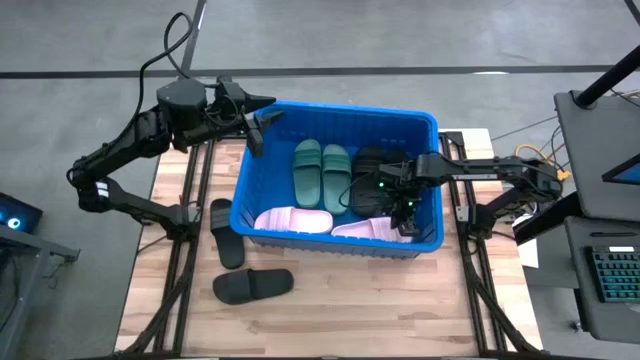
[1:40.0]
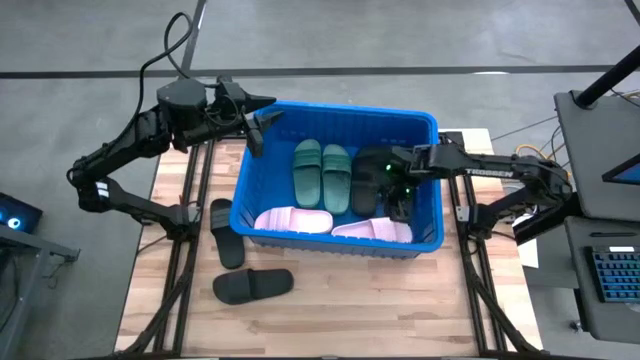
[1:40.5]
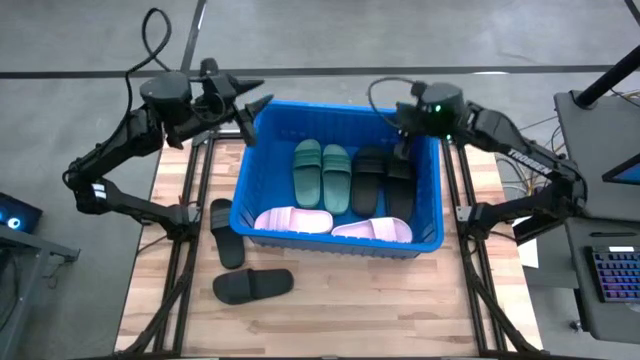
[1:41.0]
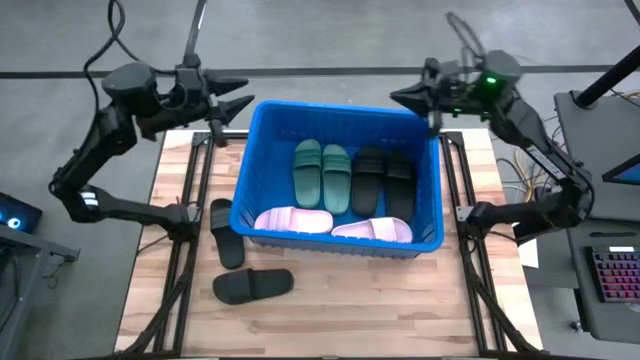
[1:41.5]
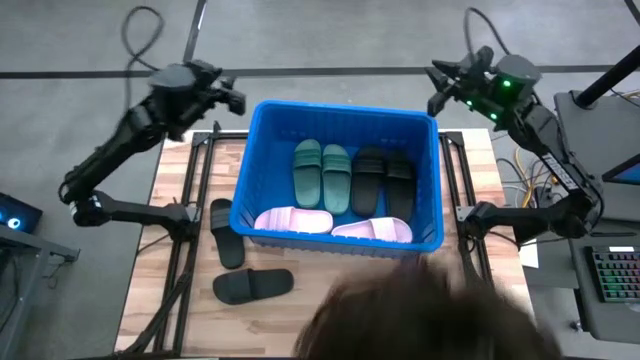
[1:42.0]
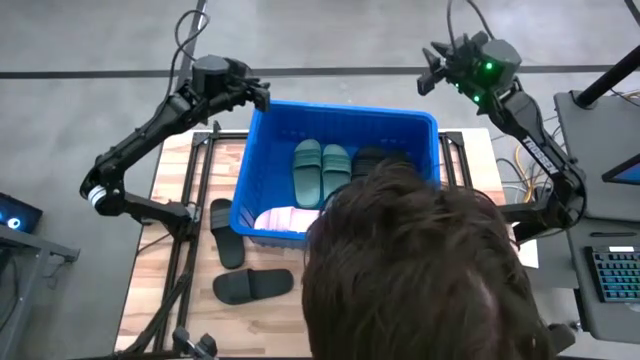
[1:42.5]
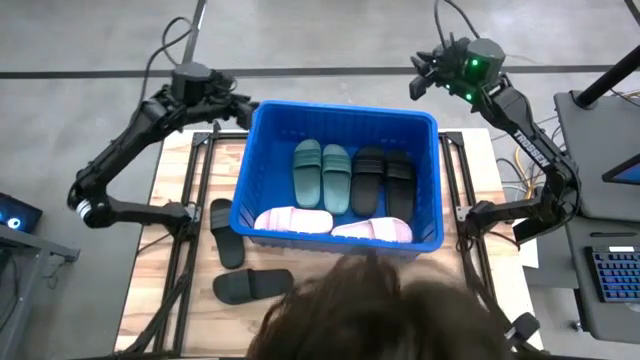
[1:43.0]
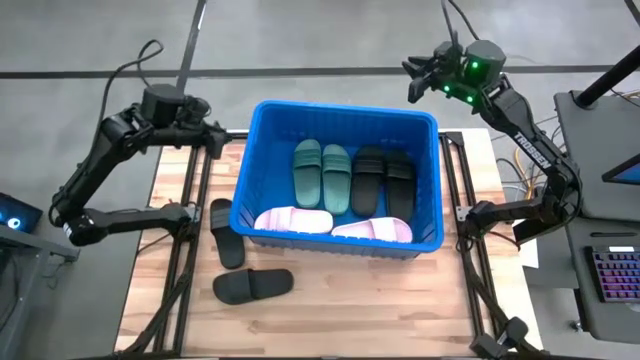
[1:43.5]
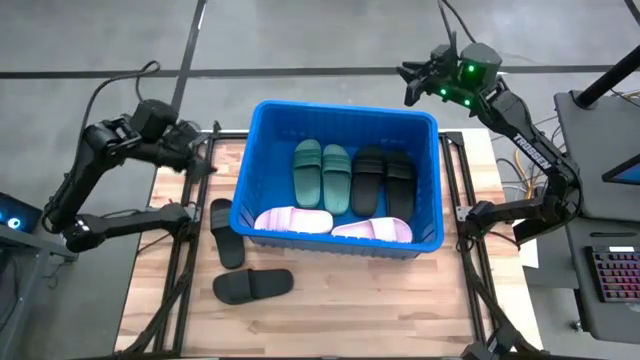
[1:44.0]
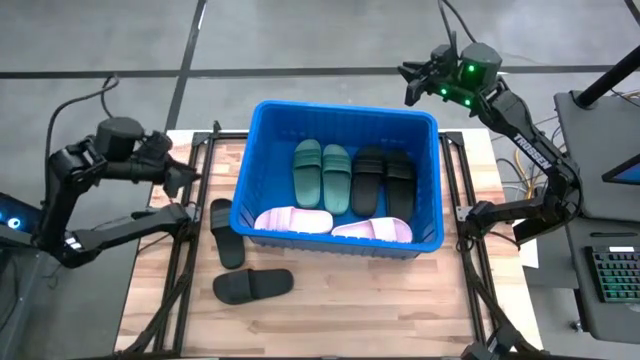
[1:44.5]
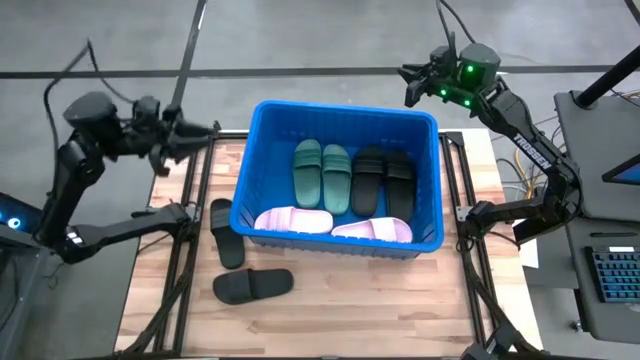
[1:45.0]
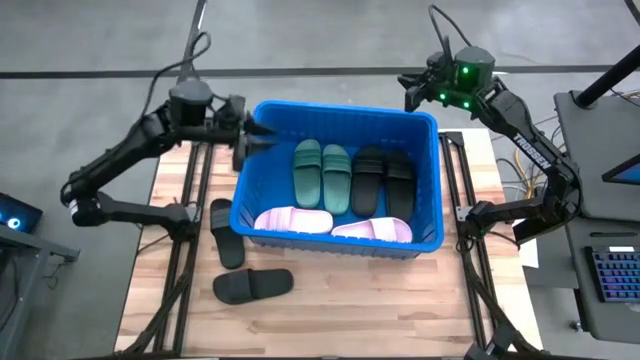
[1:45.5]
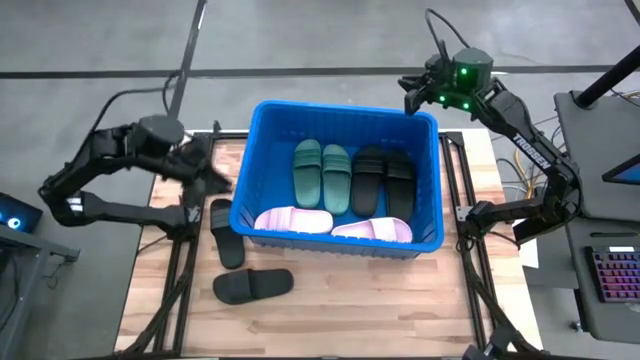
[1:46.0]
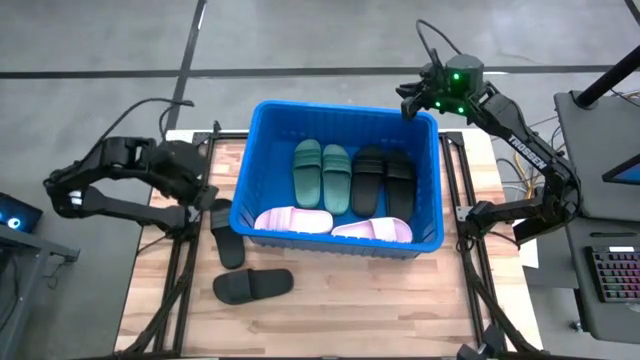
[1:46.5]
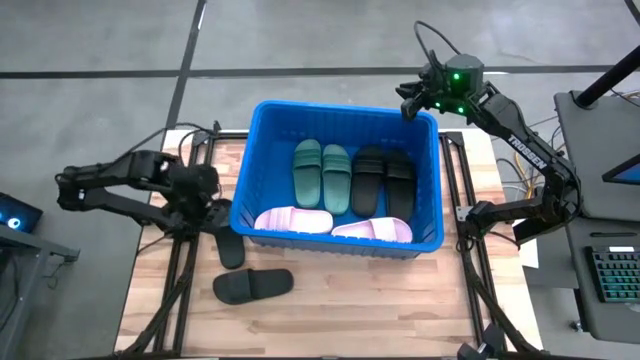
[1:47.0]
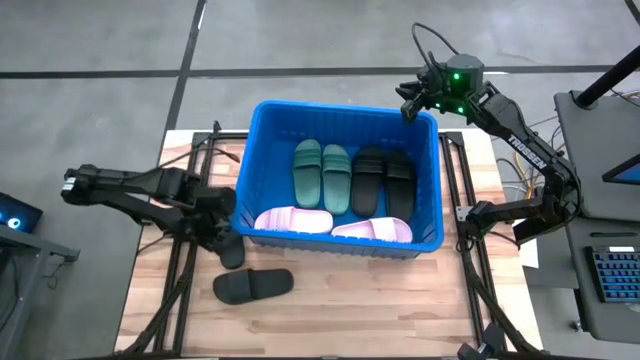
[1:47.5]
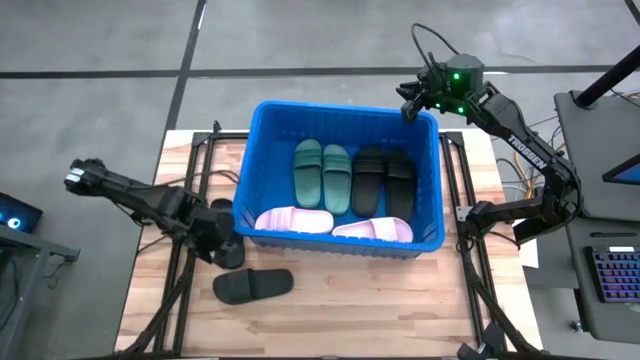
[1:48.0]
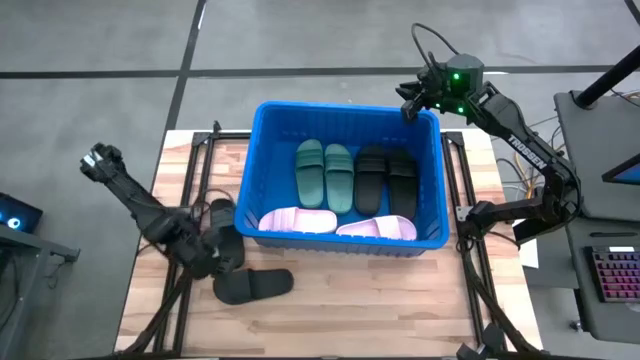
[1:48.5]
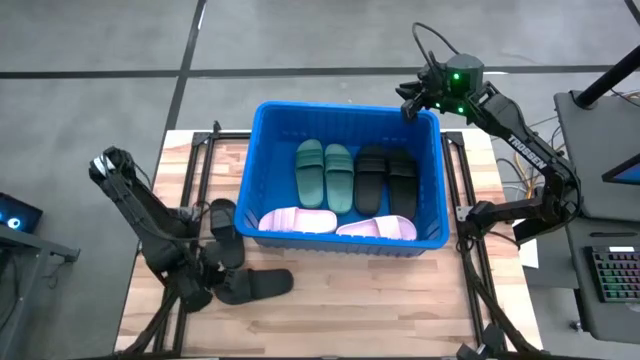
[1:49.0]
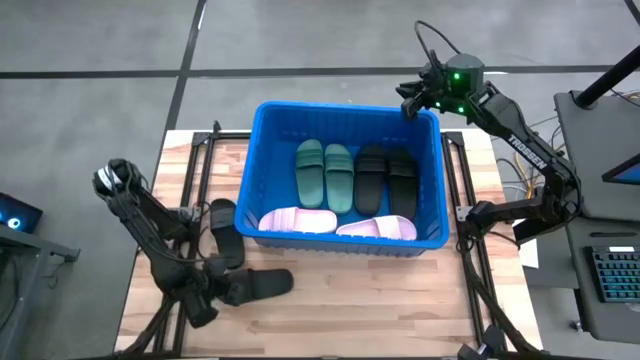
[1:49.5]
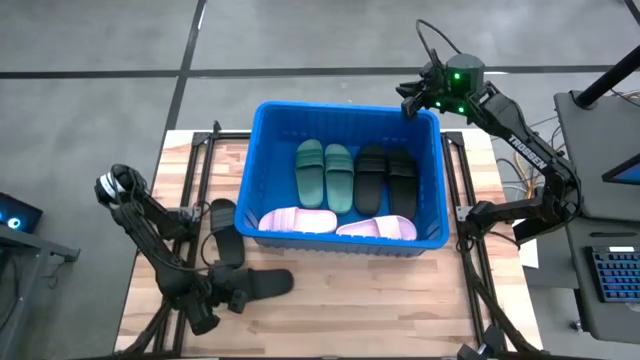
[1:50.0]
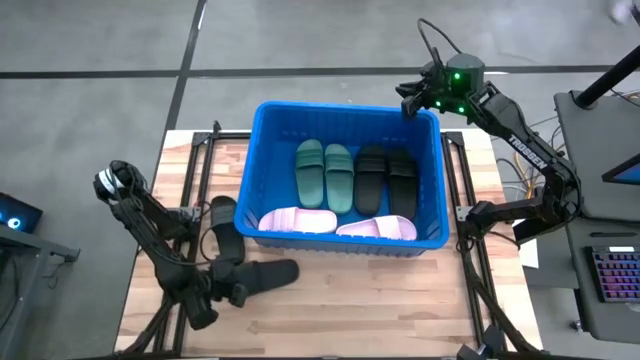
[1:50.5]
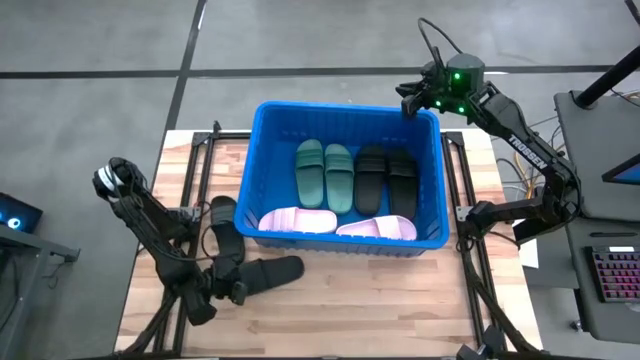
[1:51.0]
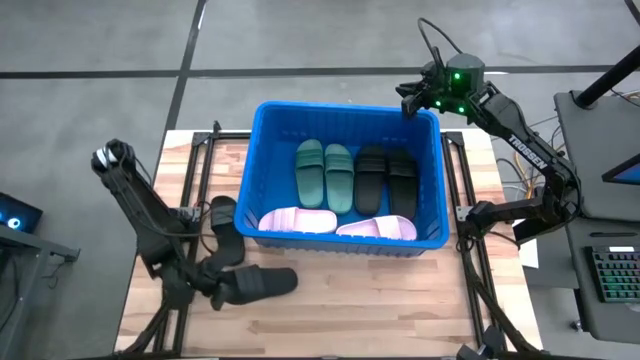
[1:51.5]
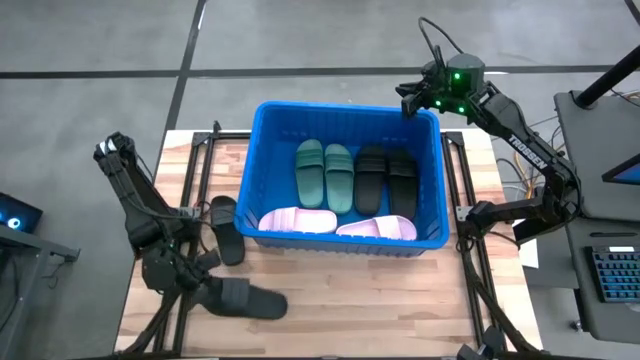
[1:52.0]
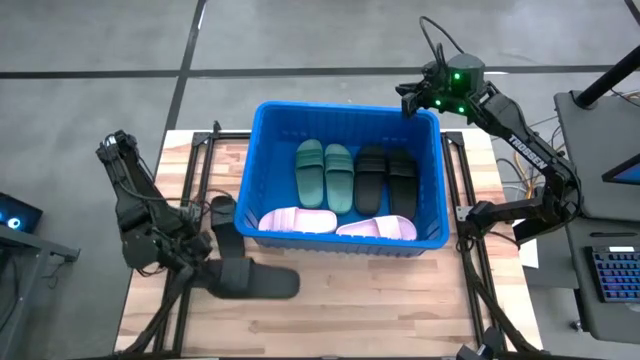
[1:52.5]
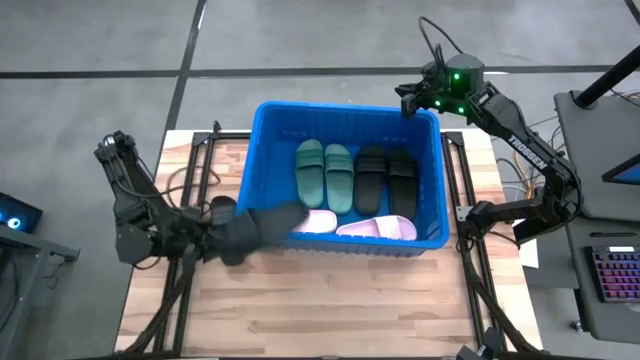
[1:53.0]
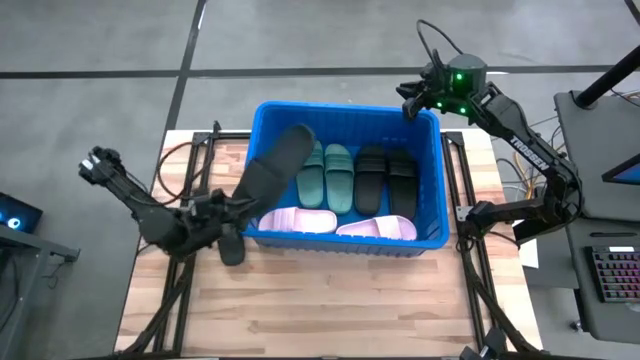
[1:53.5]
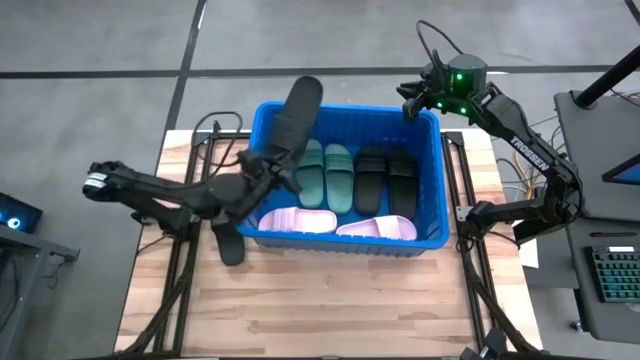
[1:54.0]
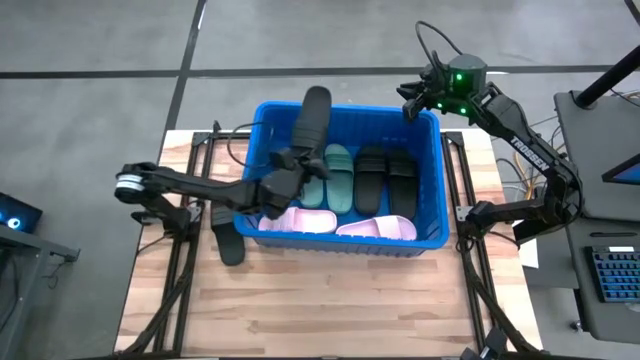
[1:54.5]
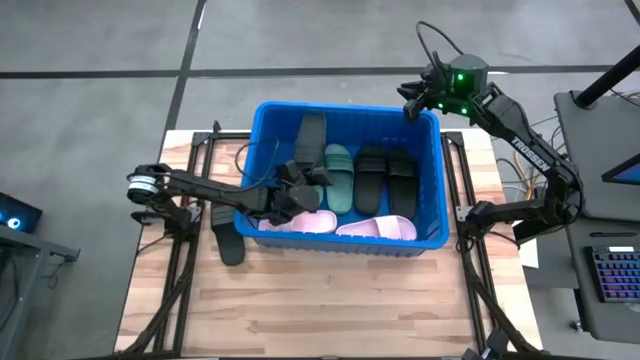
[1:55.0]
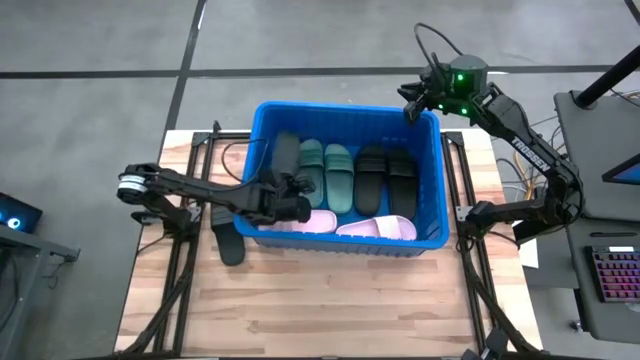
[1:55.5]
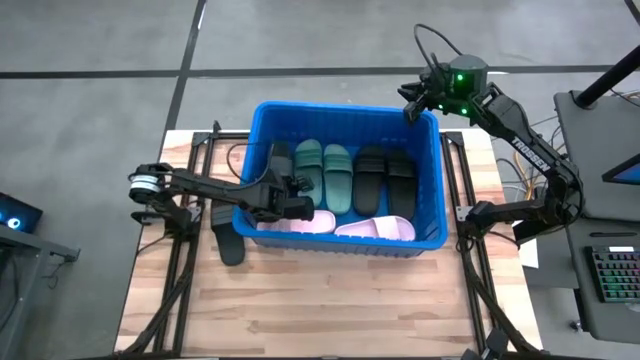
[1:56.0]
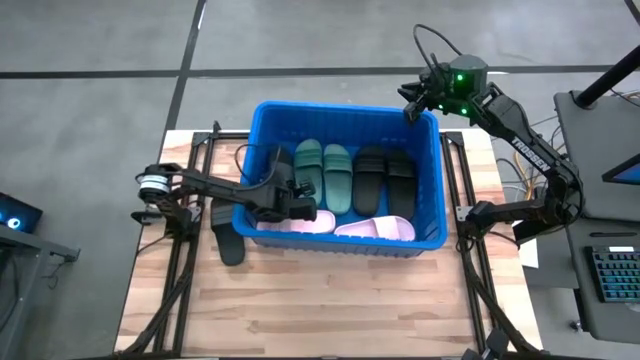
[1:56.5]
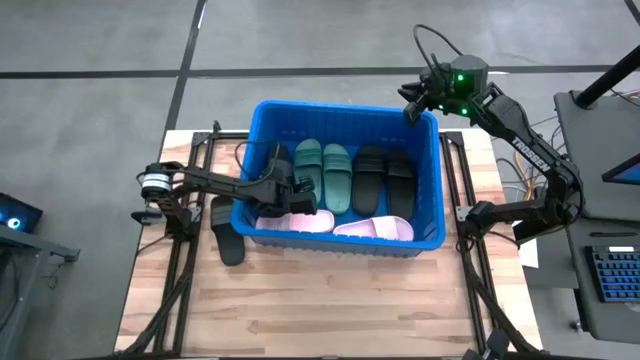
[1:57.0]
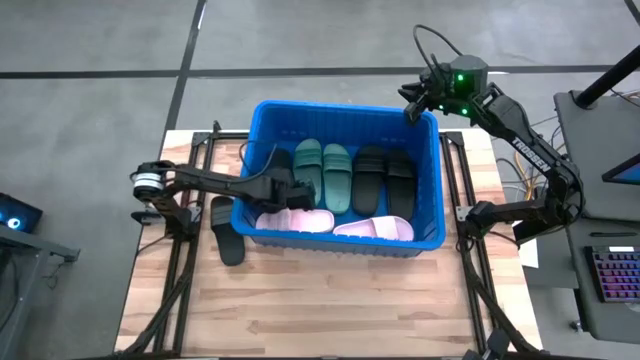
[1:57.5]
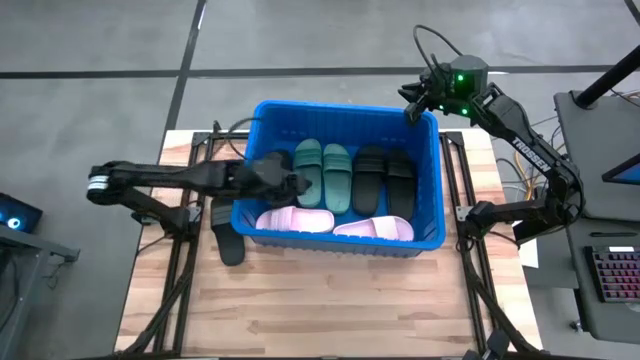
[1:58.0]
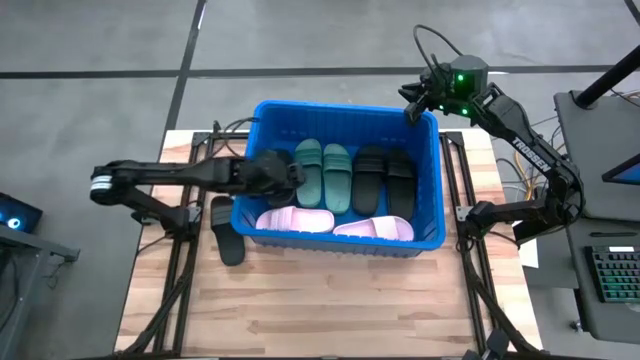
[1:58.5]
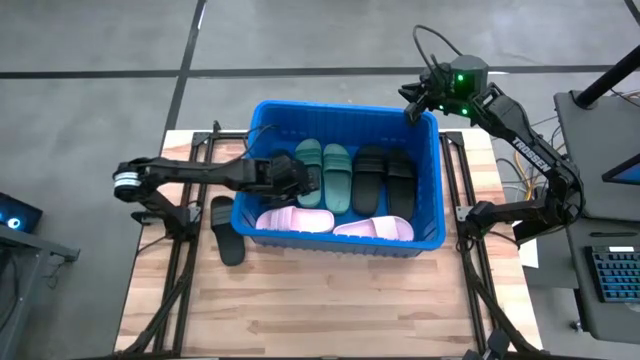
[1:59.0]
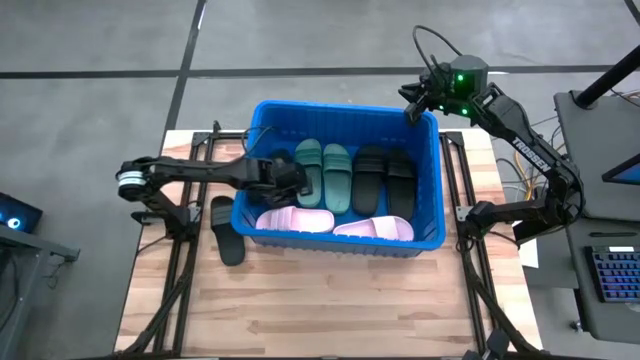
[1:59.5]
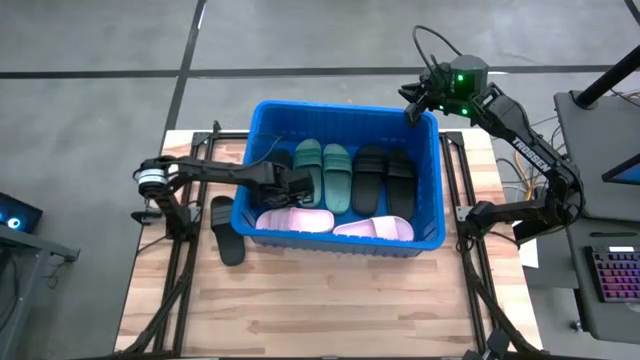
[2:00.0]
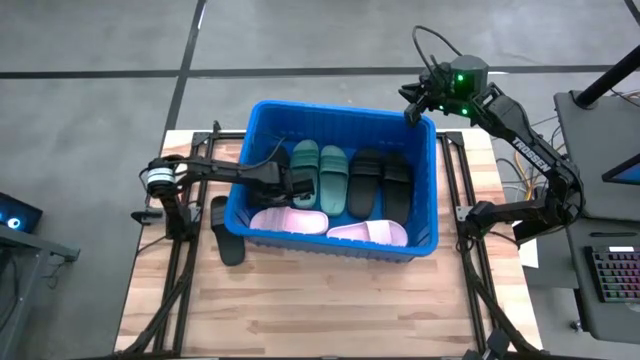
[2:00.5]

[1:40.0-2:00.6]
Task: Pick and place slides into bin
Put the black slide into the blue container
